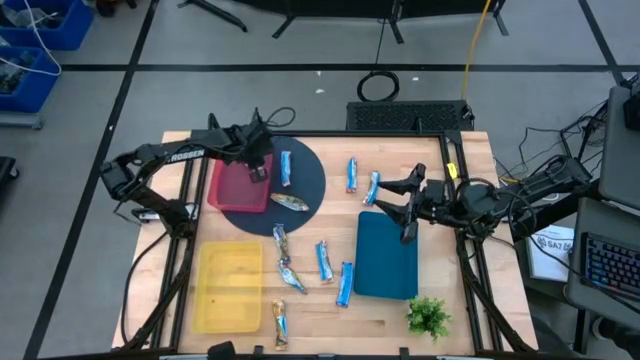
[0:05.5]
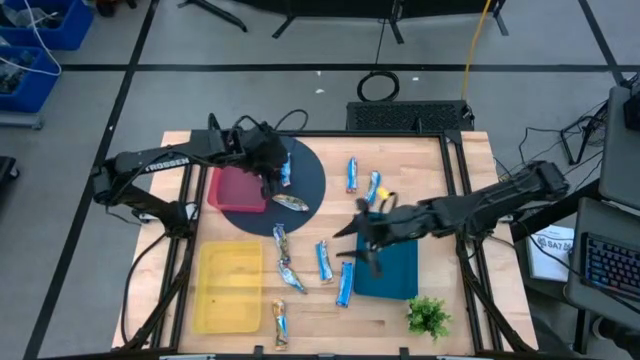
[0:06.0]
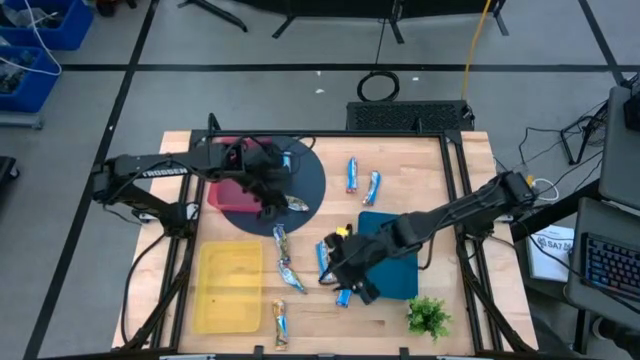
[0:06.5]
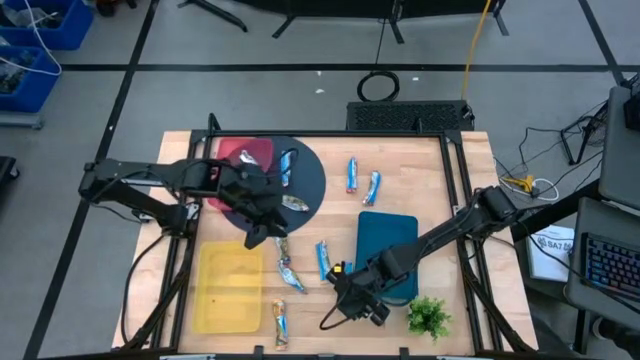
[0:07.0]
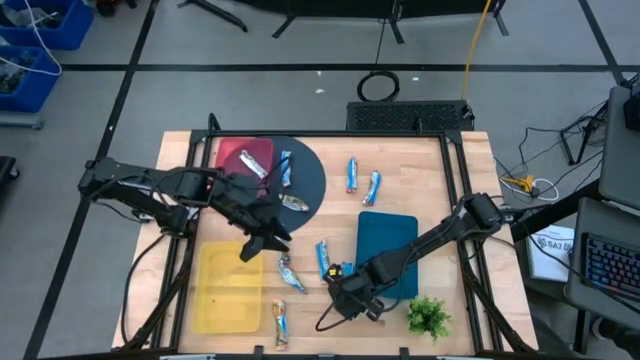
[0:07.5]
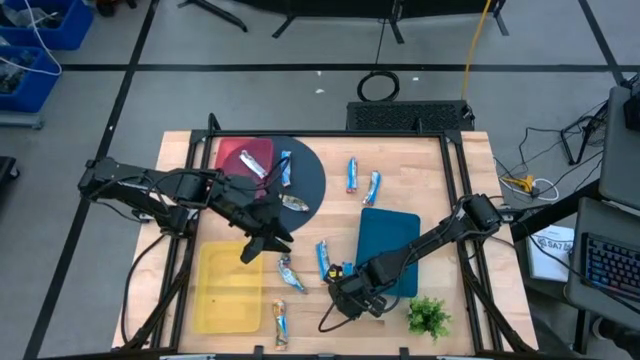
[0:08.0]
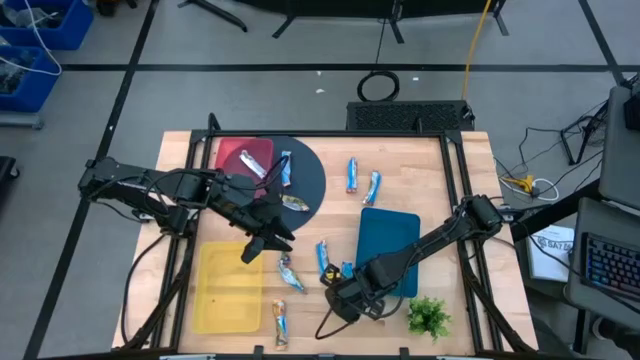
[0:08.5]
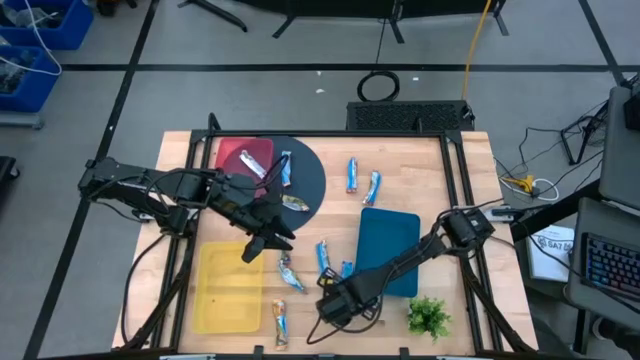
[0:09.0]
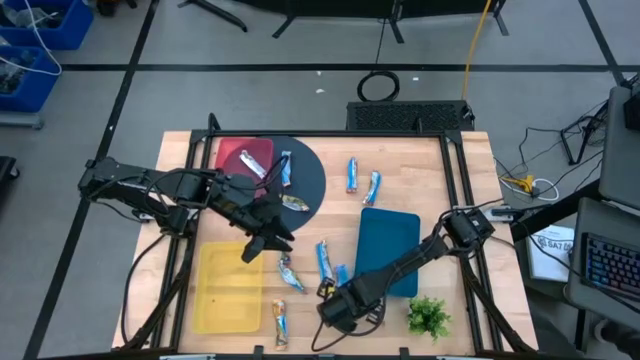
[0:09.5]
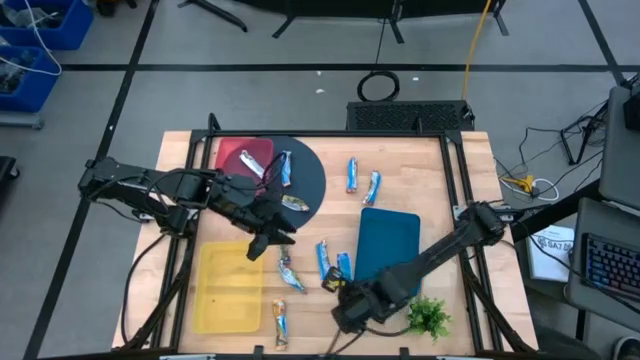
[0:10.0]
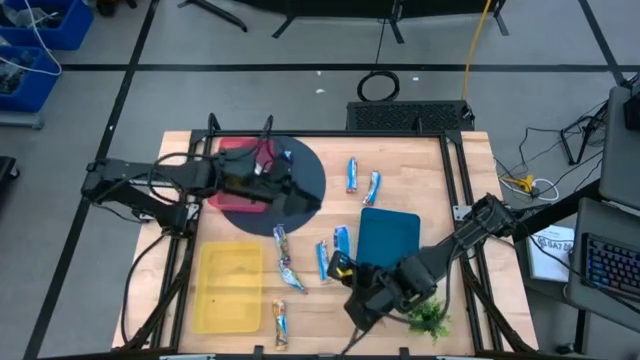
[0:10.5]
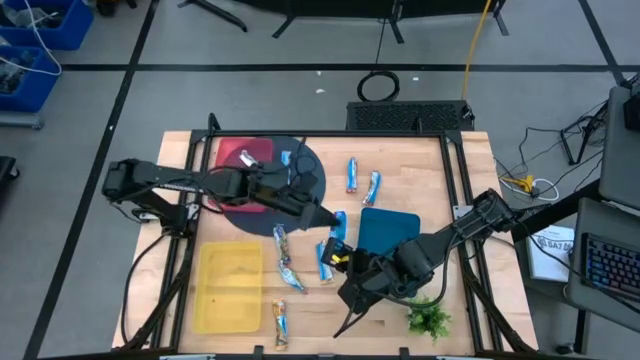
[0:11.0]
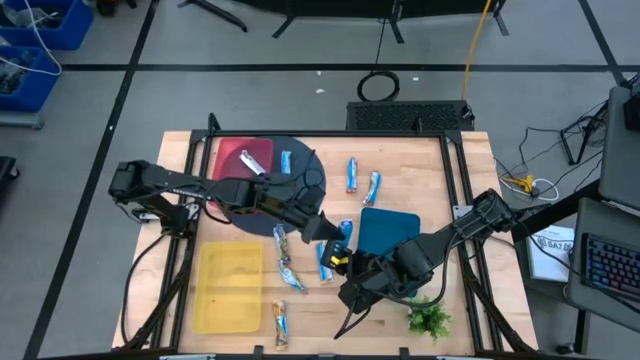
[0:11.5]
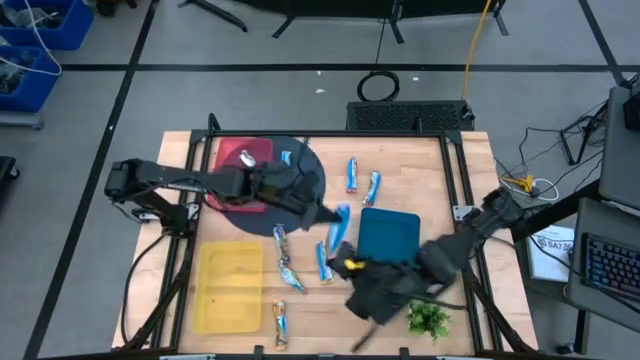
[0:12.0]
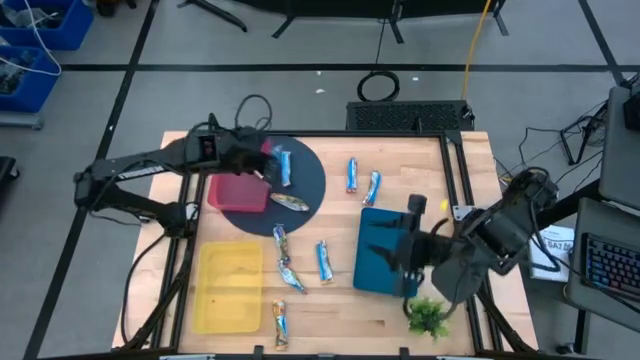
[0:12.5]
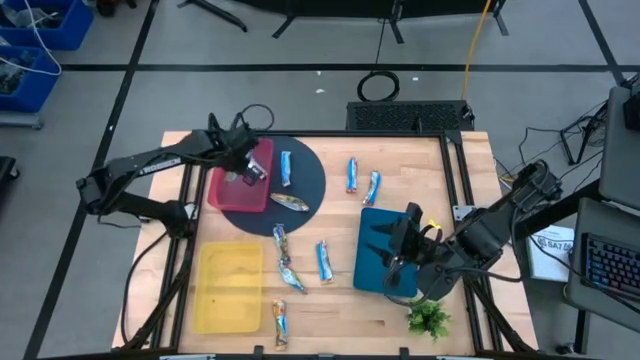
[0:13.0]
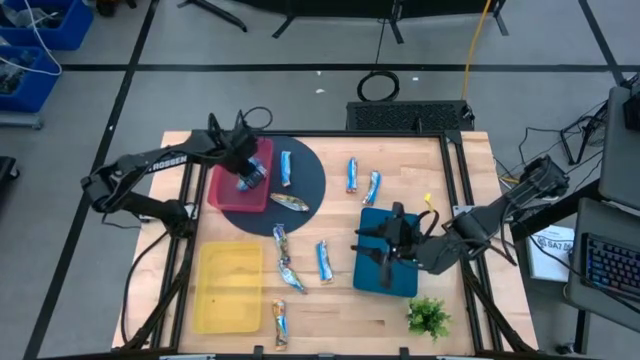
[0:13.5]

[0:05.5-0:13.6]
Task: Pick and place Granola Bars by type
Put the bottom blue granola bar into the red bin

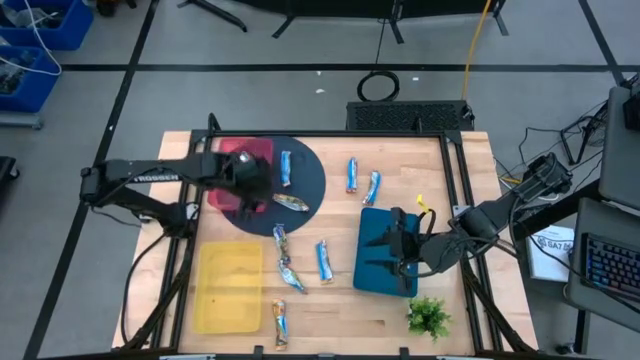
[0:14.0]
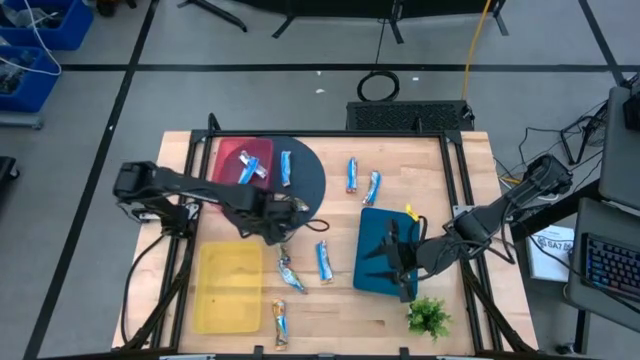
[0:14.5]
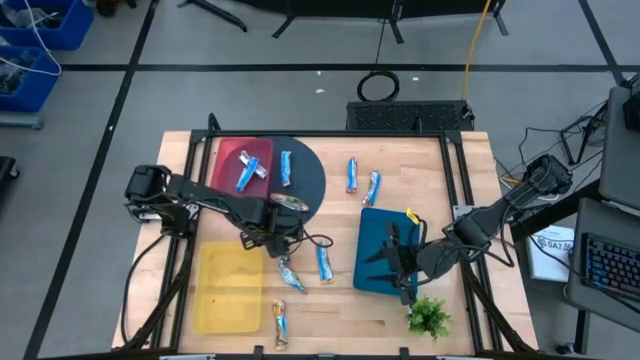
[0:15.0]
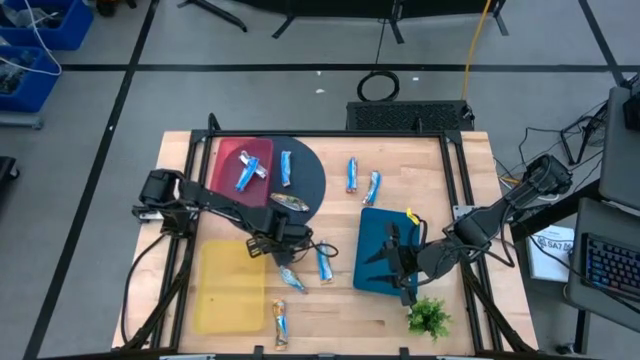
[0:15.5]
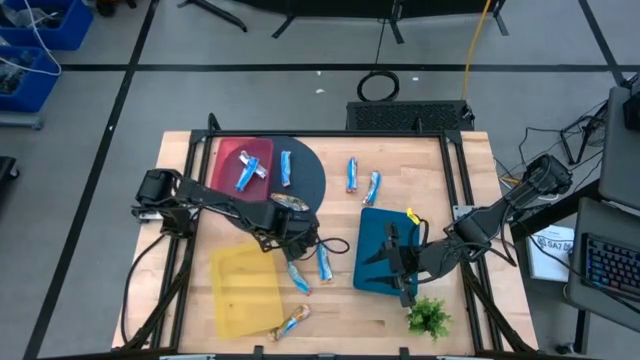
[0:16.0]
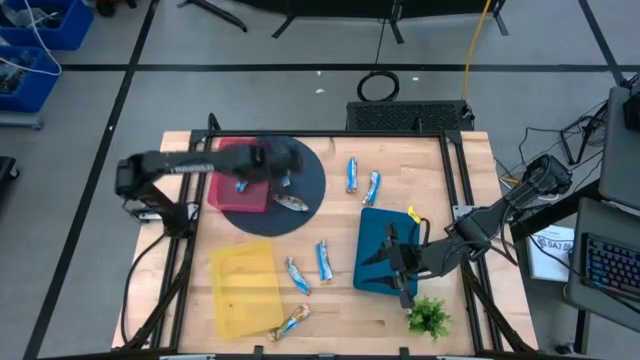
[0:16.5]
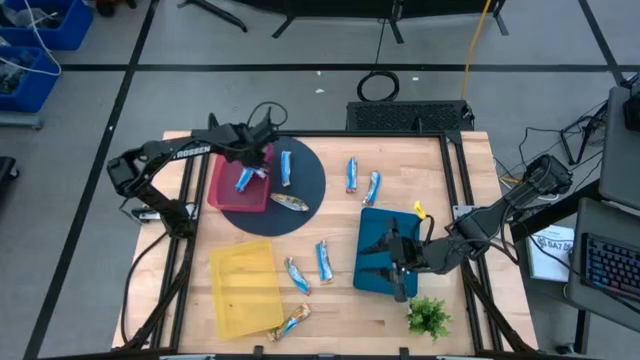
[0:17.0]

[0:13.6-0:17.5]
Put the blue granola bar into the red bin

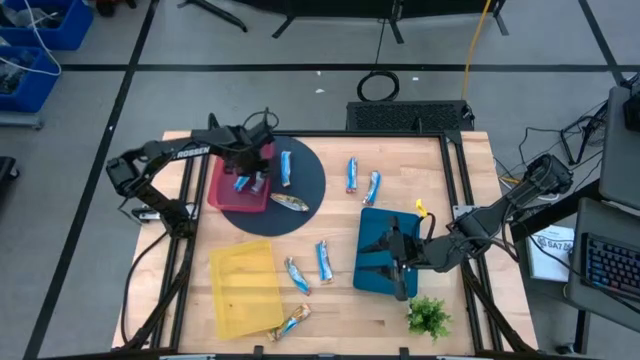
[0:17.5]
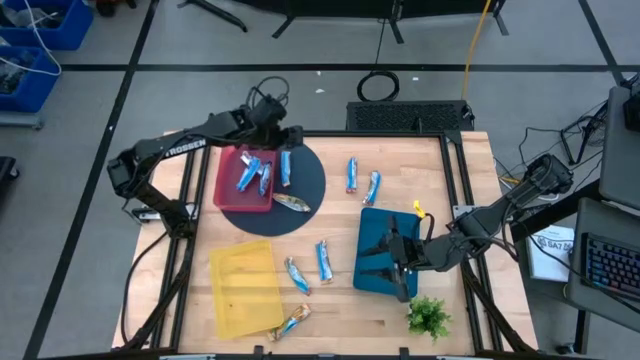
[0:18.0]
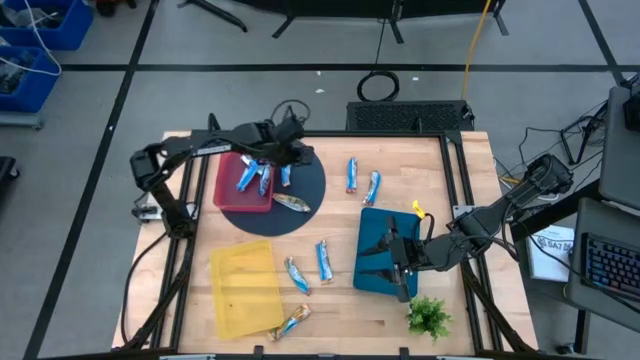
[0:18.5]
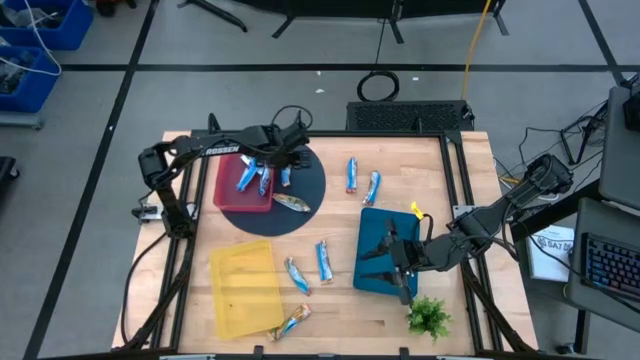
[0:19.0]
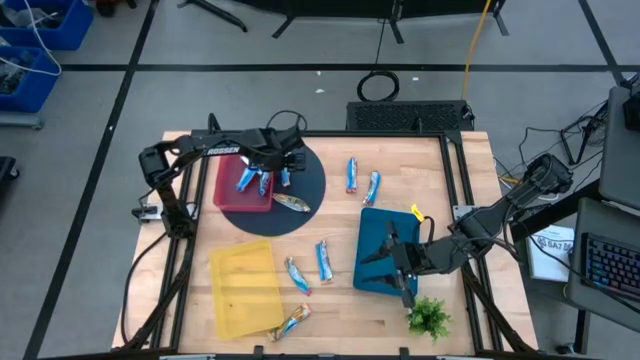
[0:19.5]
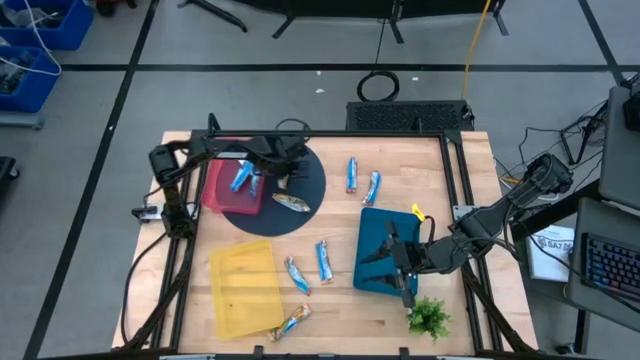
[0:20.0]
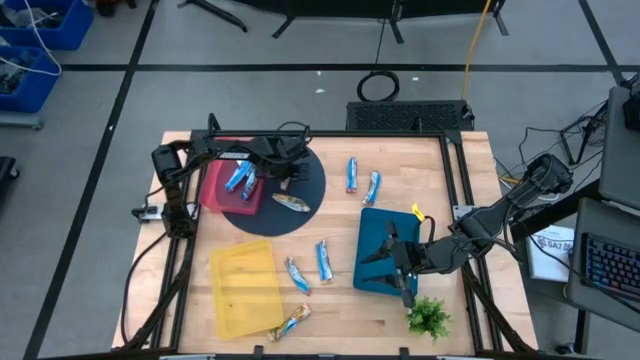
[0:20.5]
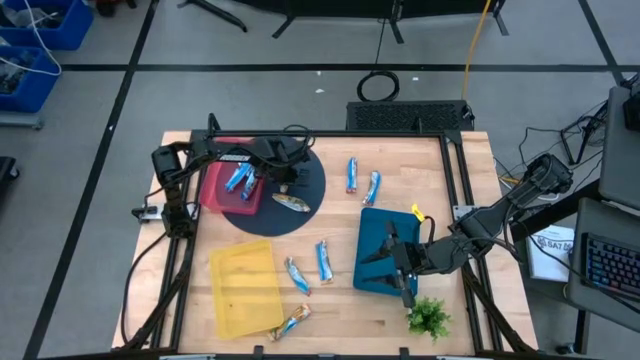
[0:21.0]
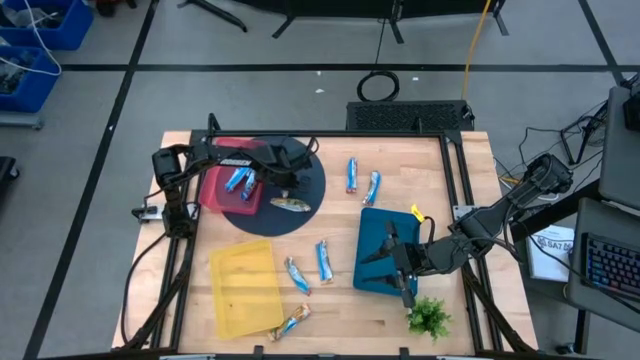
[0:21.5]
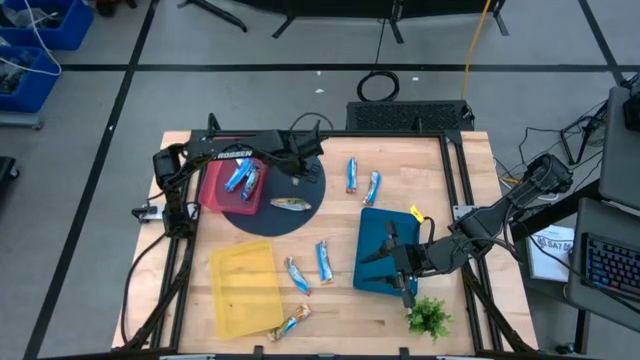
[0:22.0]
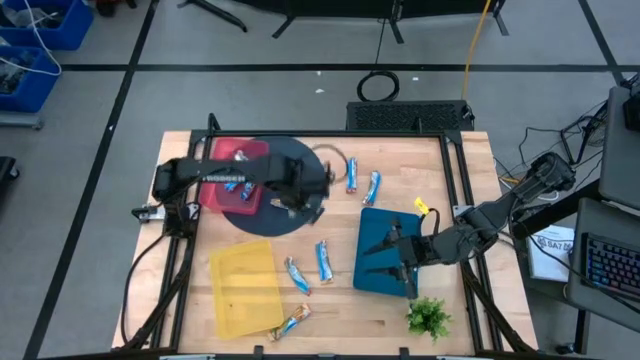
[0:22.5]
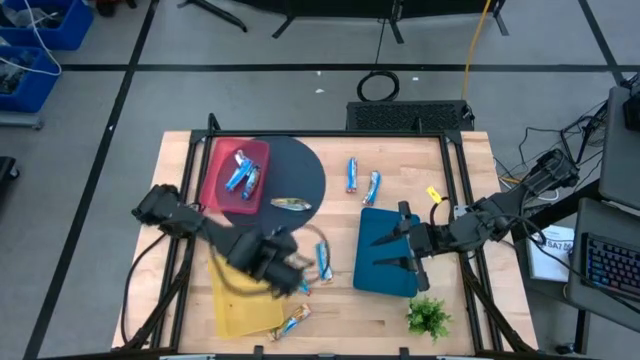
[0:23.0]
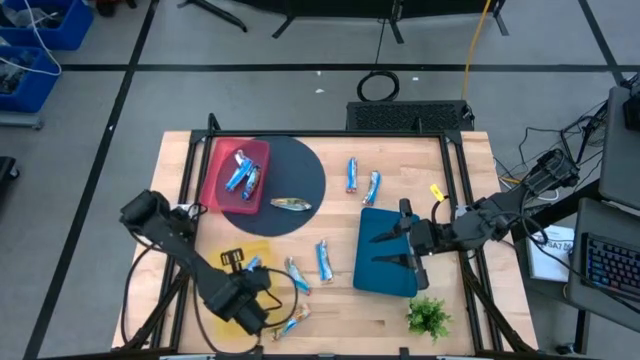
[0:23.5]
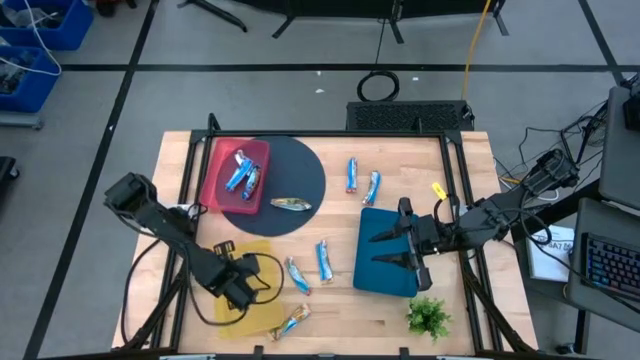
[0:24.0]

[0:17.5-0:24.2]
Put the yellow granola bar into the yellow bin

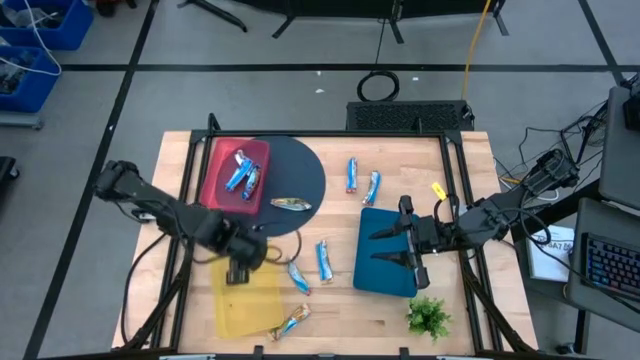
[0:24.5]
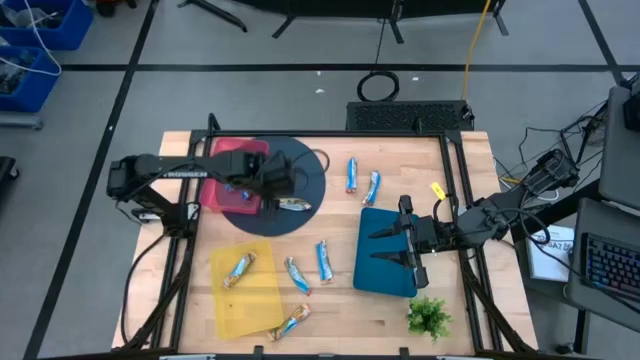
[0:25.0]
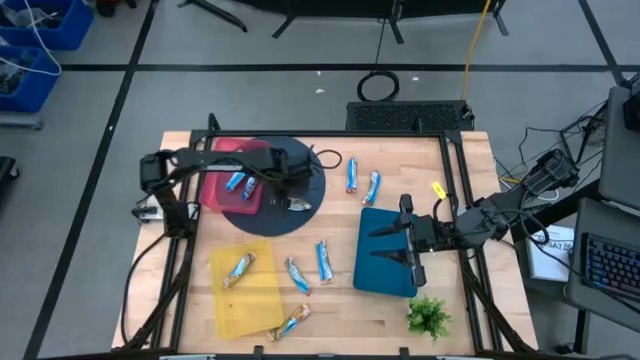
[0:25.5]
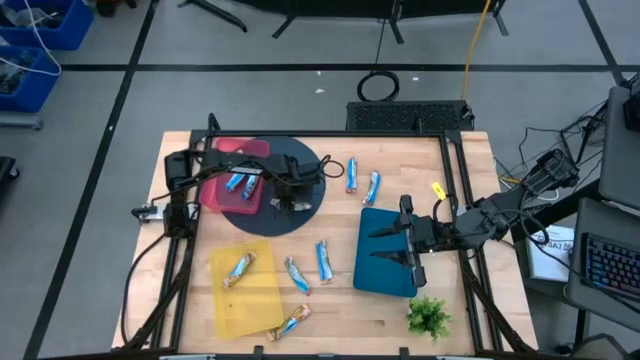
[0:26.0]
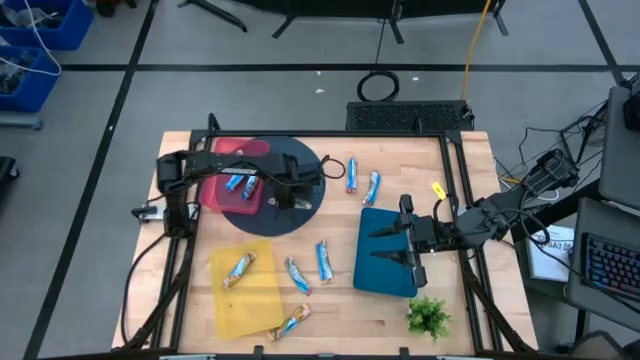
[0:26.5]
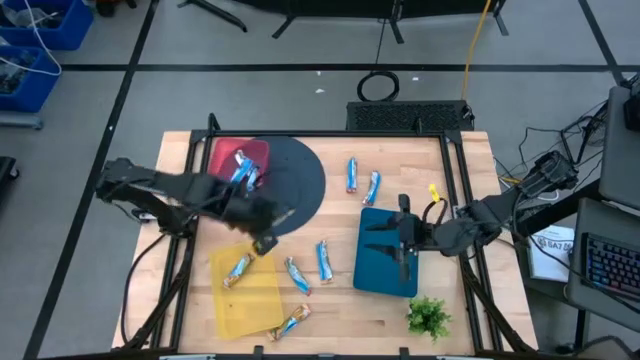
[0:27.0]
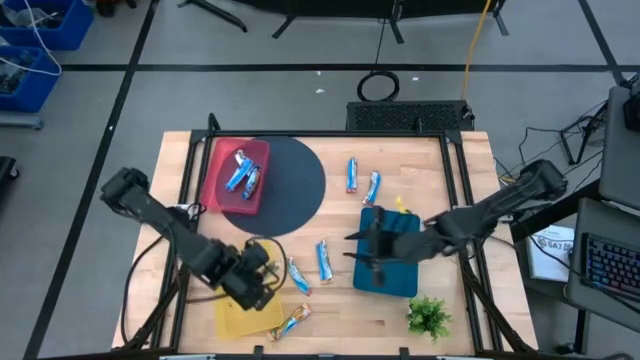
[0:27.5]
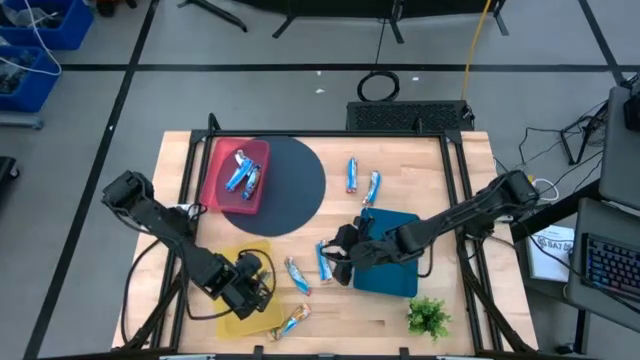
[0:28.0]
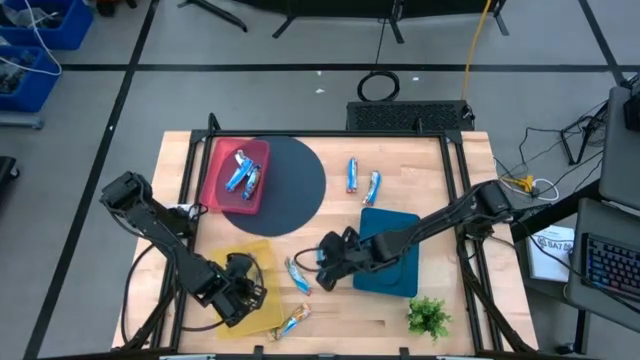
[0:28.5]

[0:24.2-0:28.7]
Put the yellow granola bar into the yellow bin
